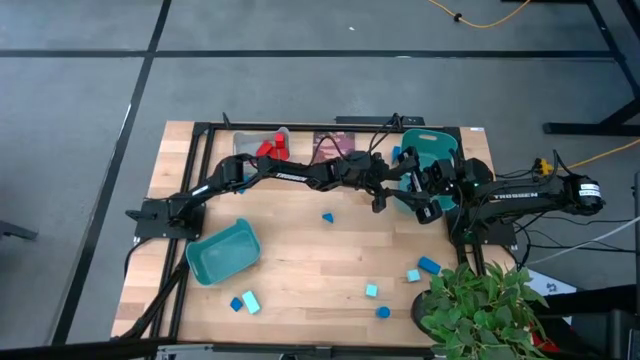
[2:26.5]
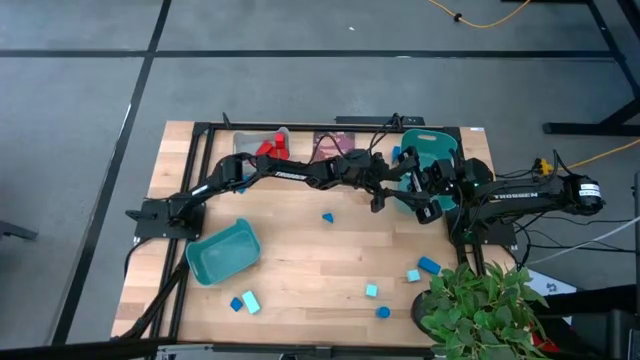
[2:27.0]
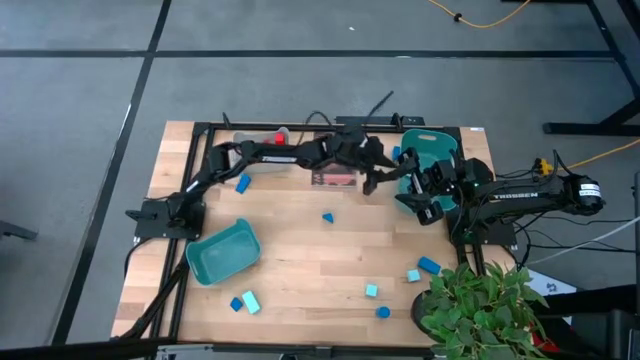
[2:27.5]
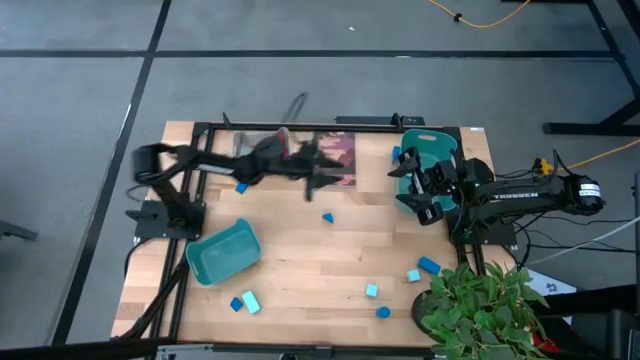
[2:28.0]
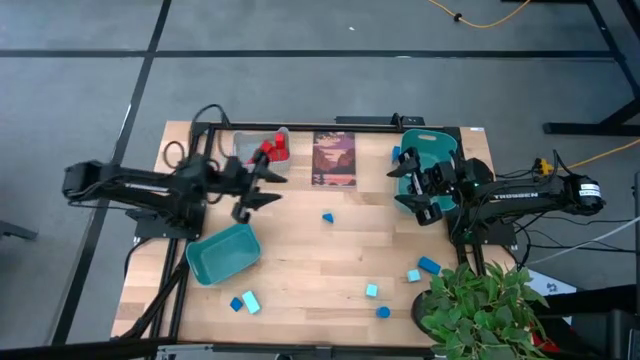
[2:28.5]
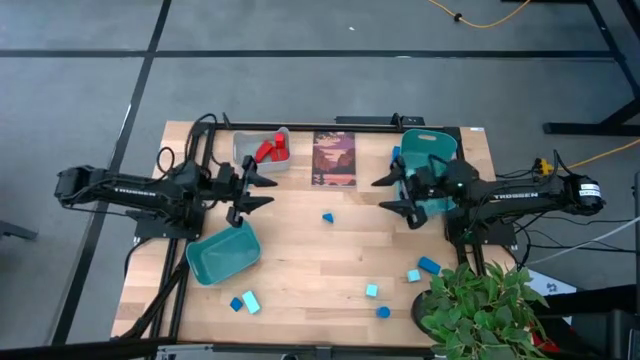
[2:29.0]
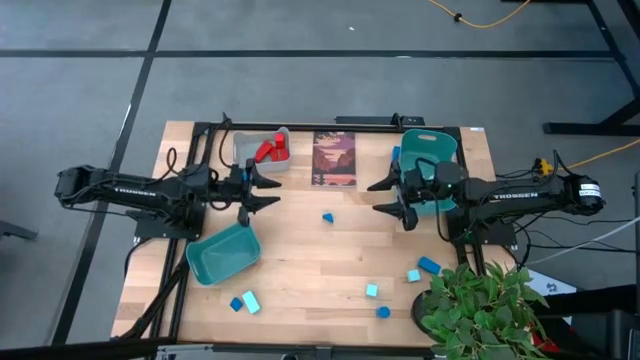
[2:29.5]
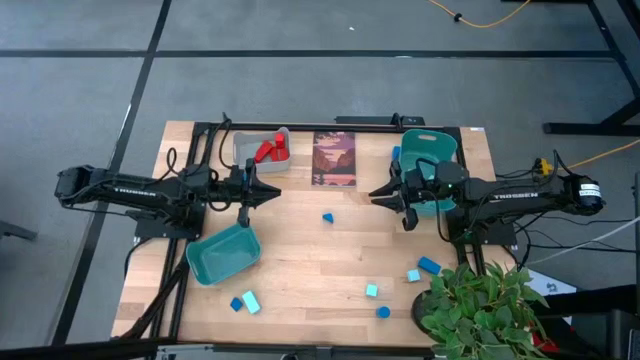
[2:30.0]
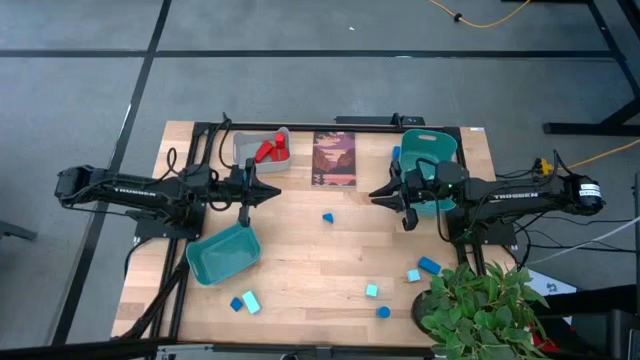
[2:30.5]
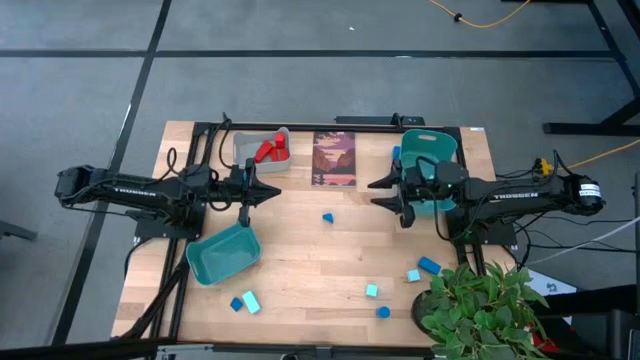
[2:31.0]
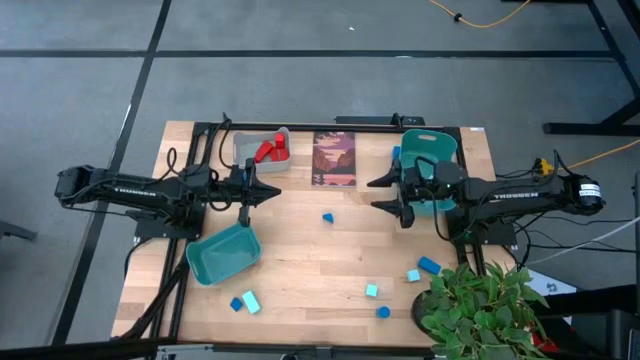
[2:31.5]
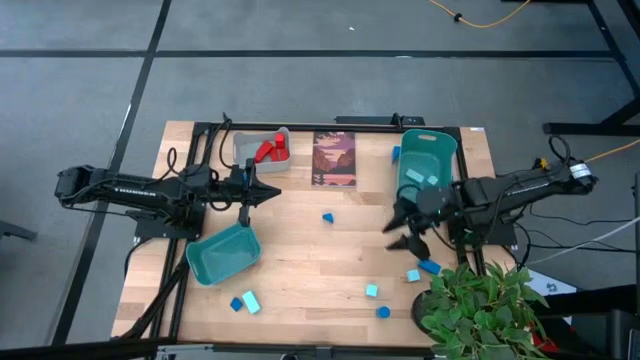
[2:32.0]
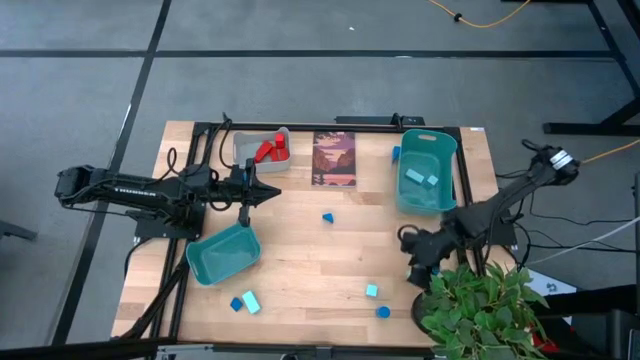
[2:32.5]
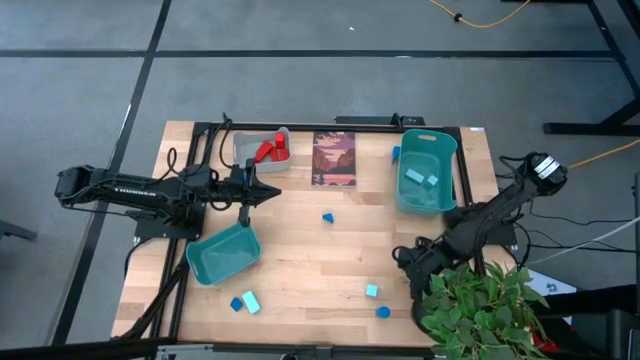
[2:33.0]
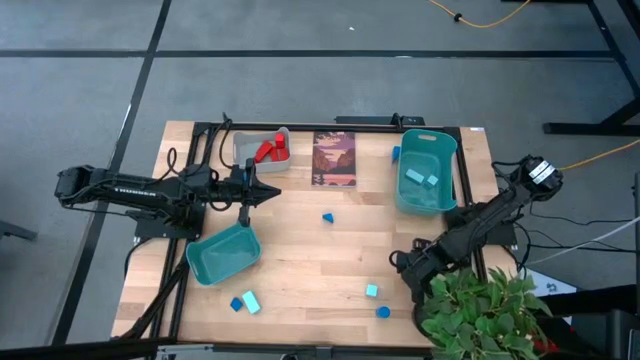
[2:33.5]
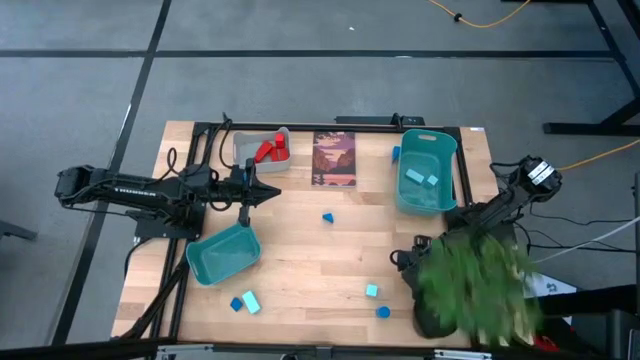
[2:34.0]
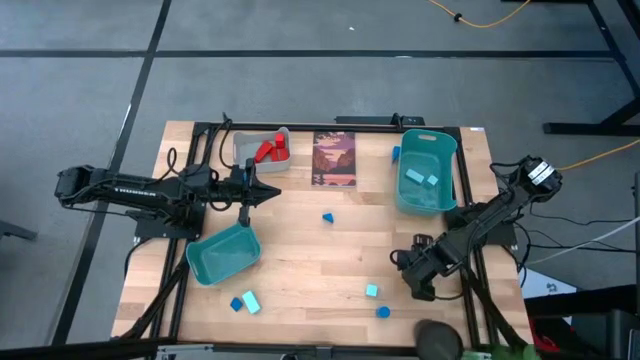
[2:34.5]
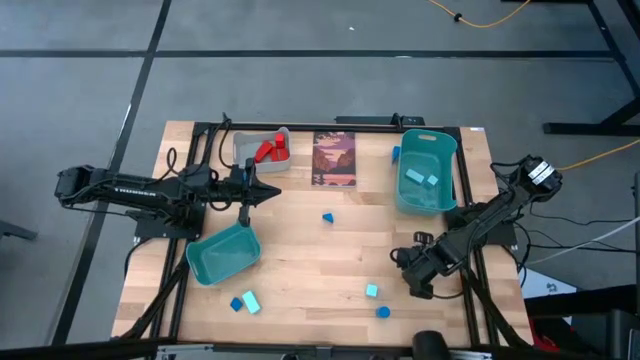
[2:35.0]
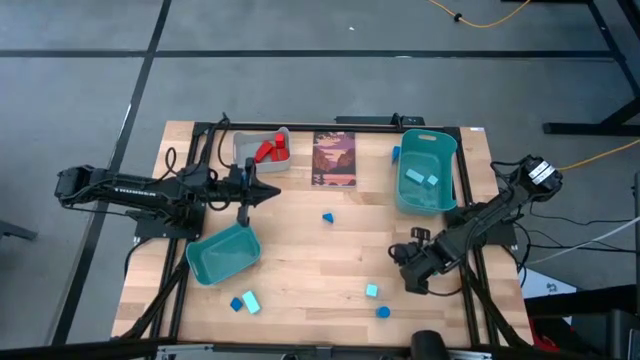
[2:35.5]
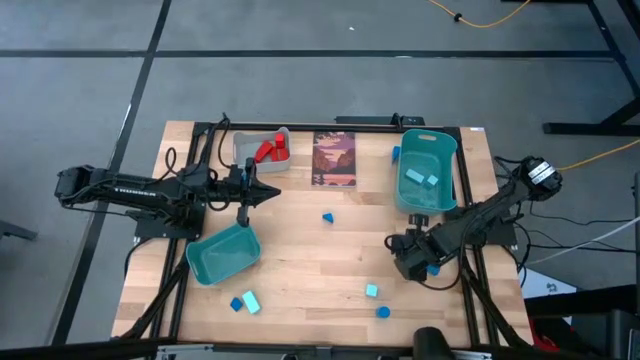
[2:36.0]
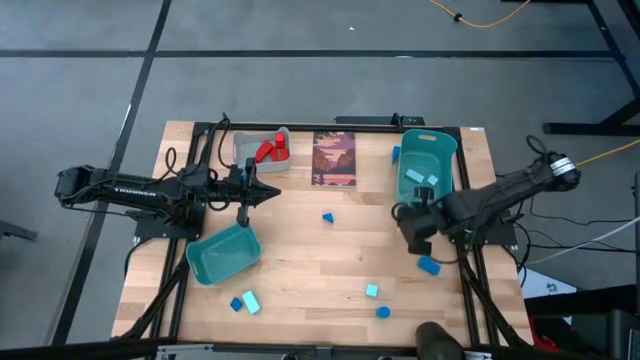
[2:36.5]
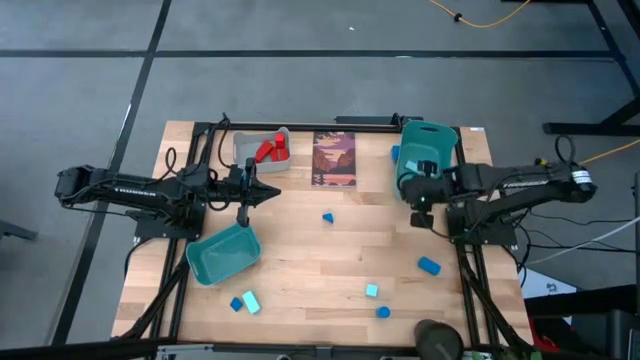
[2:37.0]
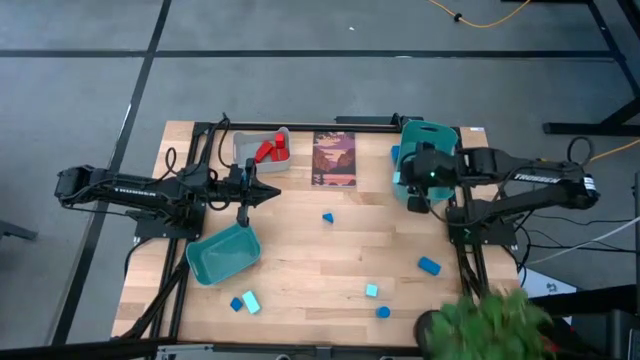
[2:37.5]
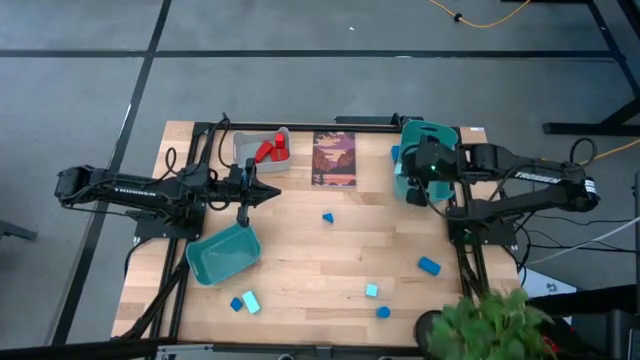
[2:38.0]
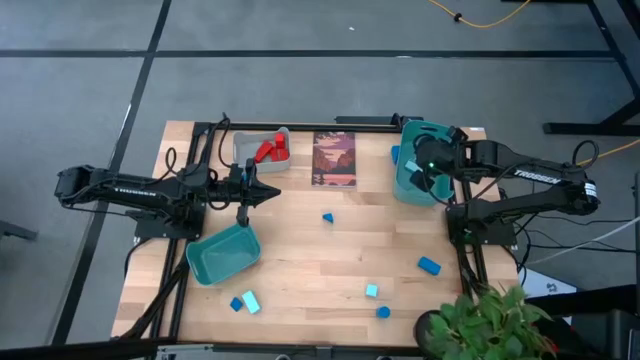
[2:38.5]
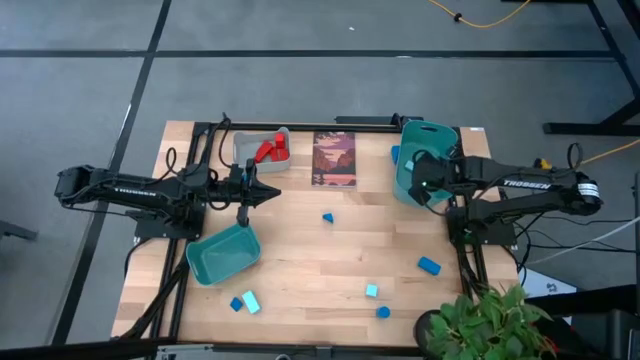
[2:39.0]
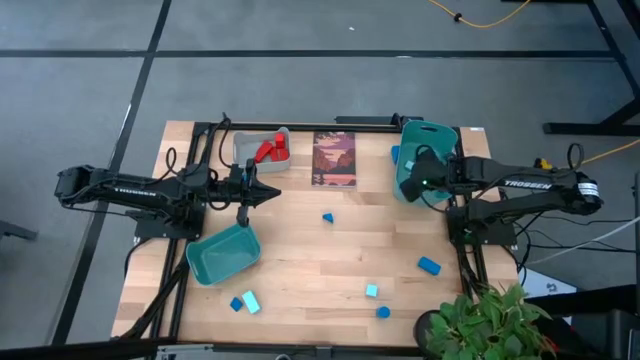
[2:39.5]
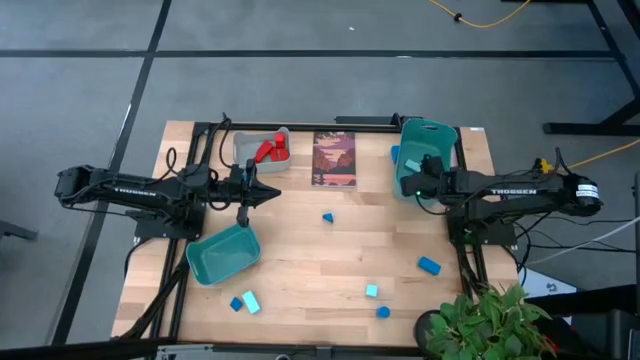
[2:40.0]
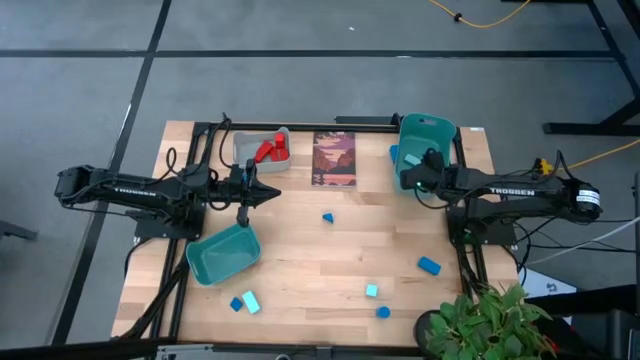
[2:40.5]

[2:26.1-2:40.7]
Task: Sort & place blocks by color
Put the light blue block into the right green bin

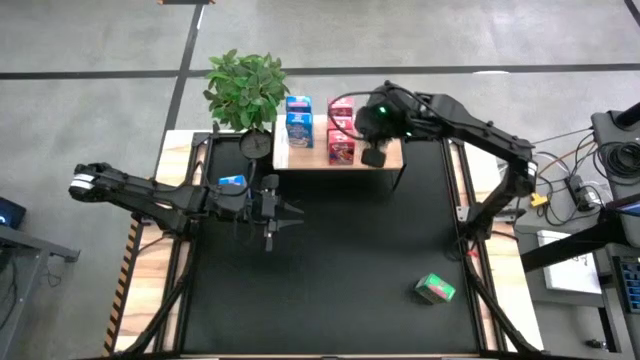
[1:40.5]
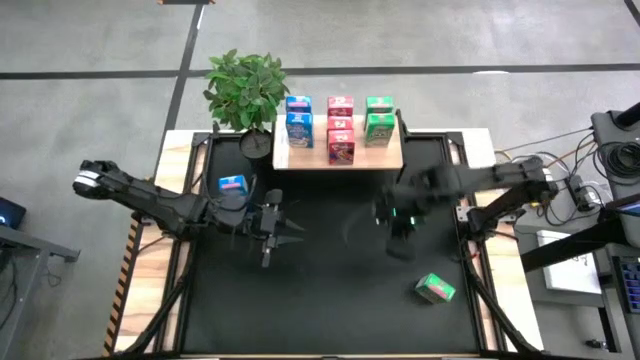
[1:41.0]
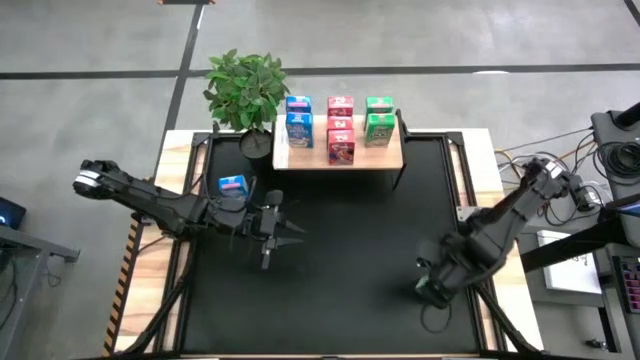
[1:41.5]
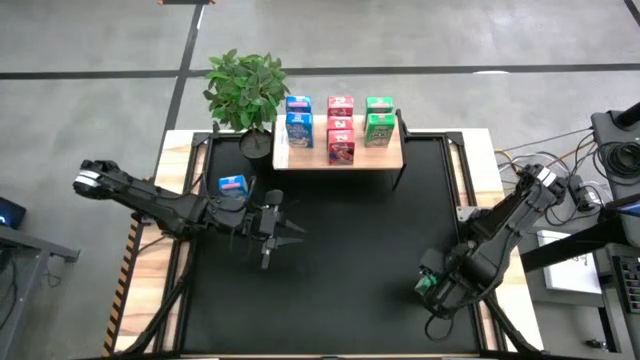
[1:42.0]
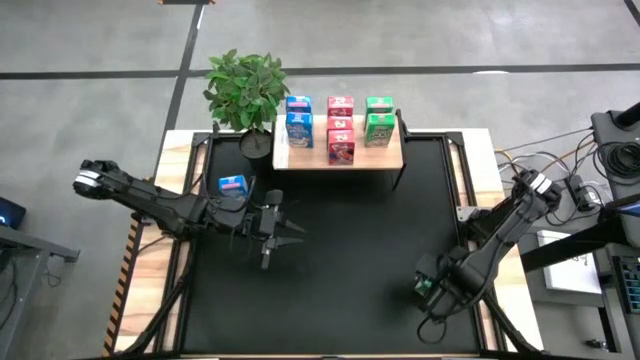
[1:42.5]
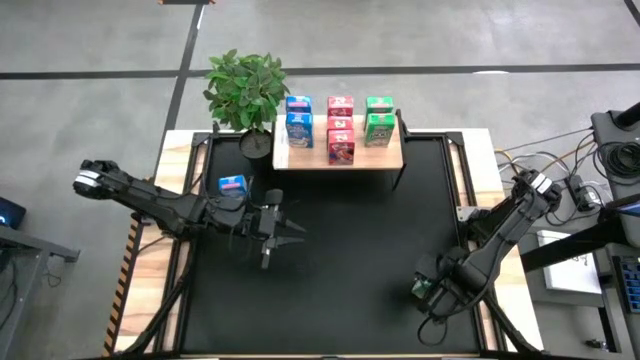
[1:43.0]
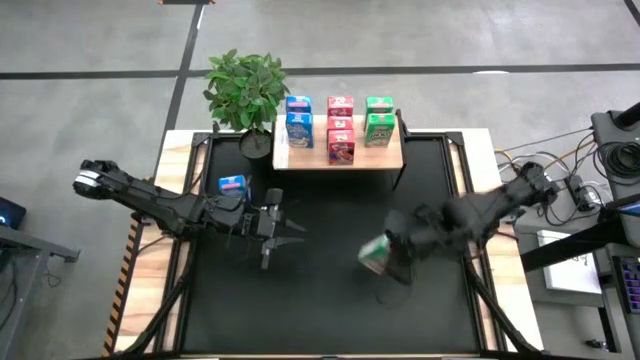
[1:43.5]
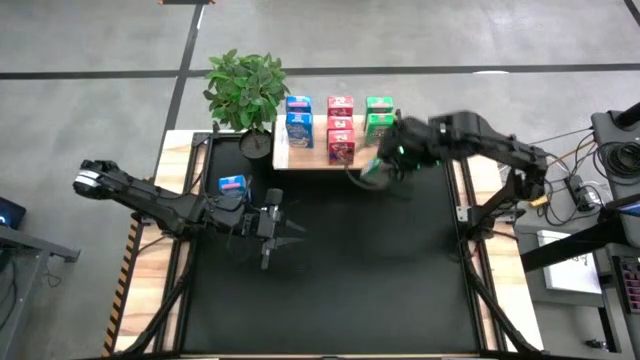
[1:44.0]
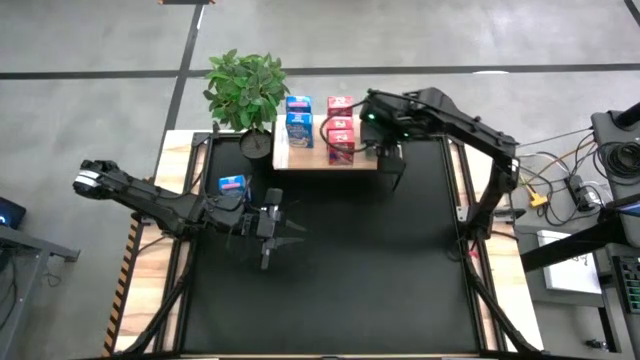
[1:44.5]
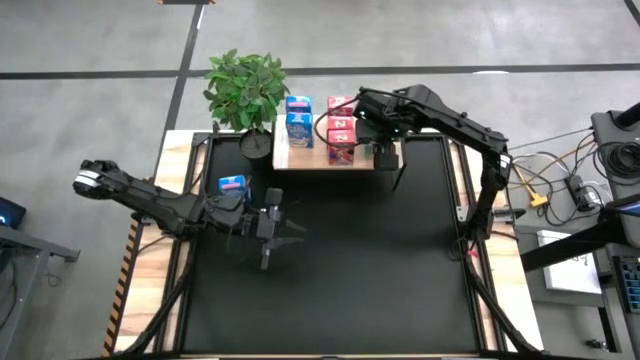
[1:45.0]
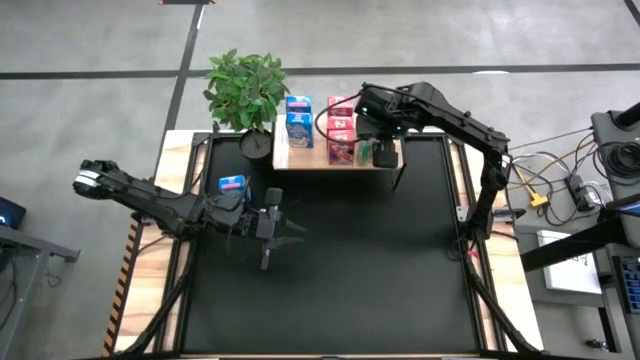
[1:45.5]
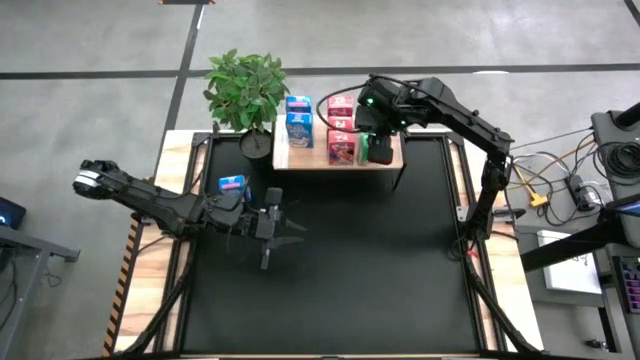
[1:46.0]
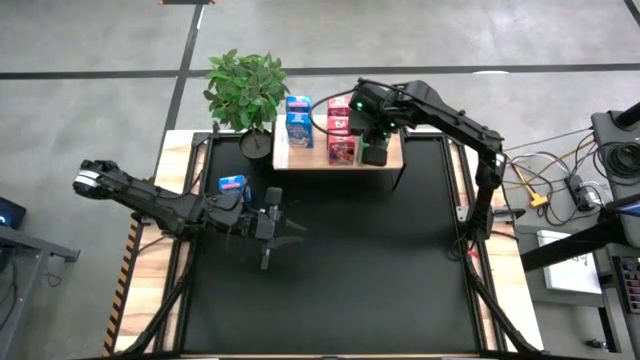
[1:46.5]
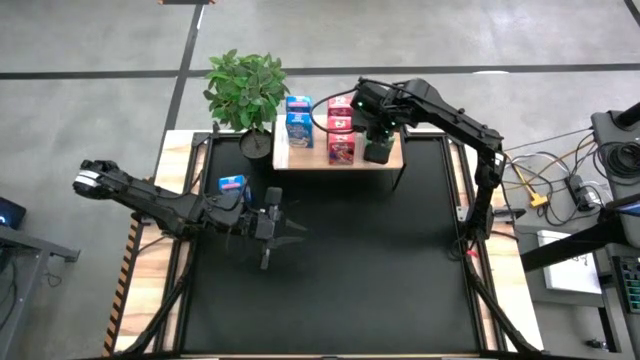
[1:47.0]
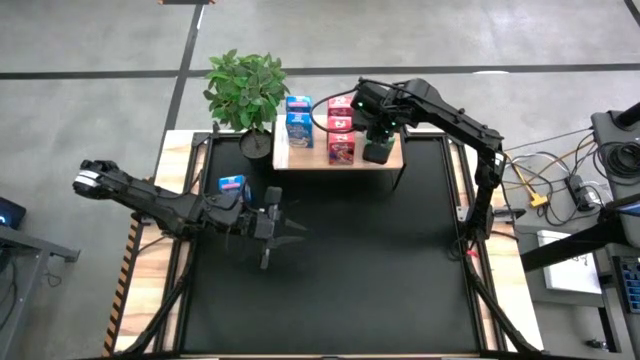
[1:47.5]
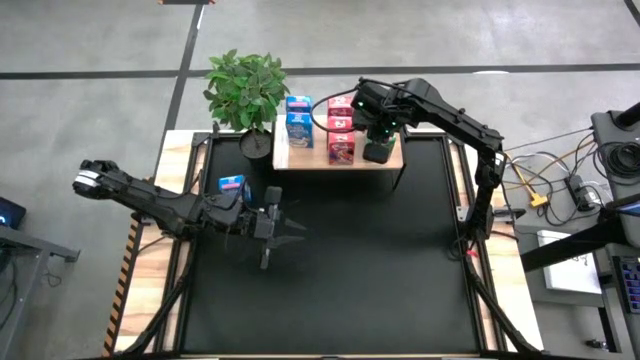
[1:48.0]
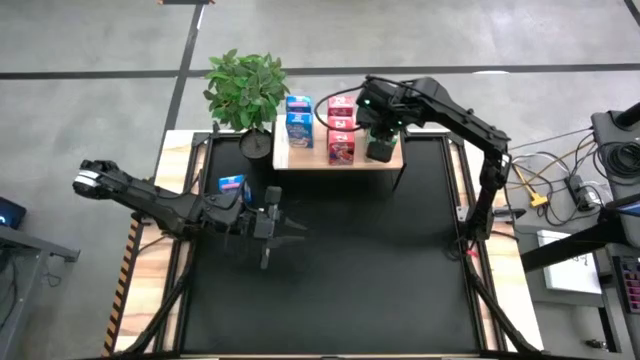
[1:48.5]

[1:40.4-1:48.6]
Task: Stack cereal on shelf
Put the green cereal box aligned with the other green cereal boxes on the shelf
